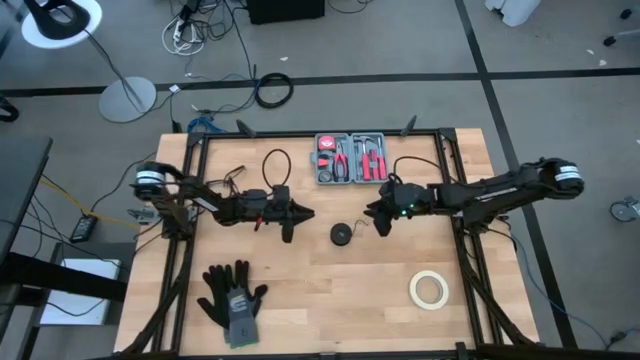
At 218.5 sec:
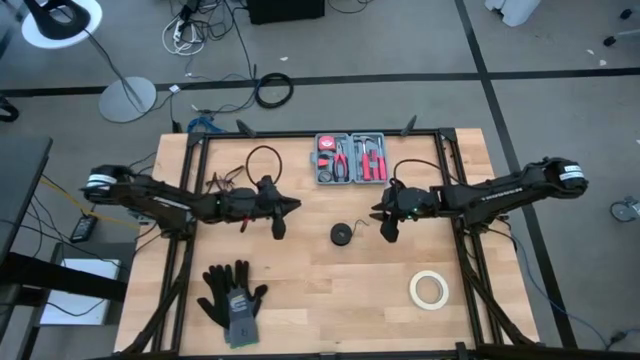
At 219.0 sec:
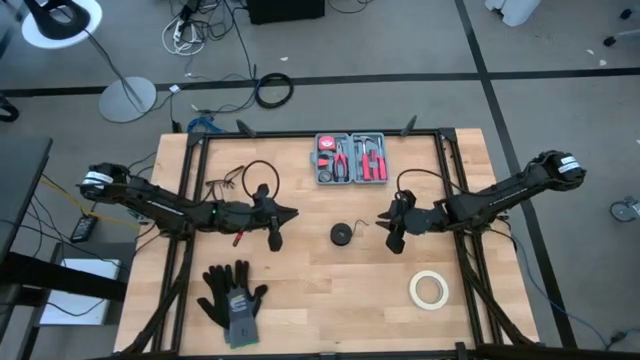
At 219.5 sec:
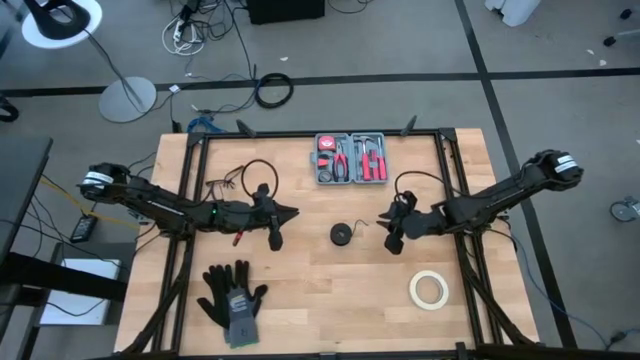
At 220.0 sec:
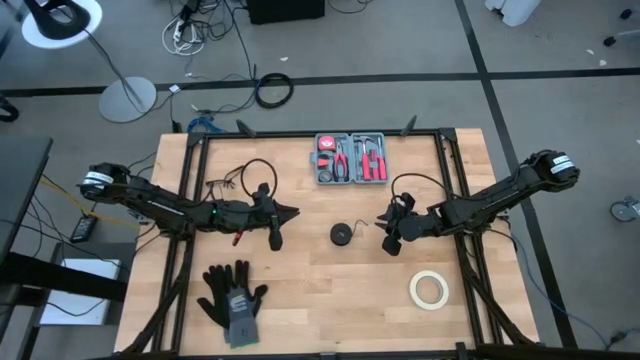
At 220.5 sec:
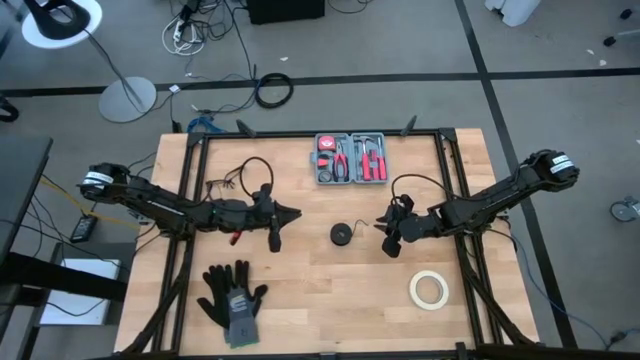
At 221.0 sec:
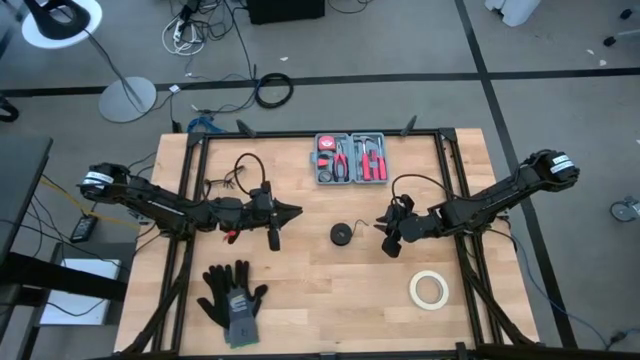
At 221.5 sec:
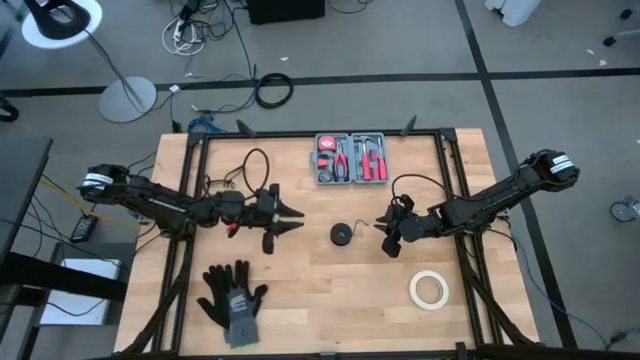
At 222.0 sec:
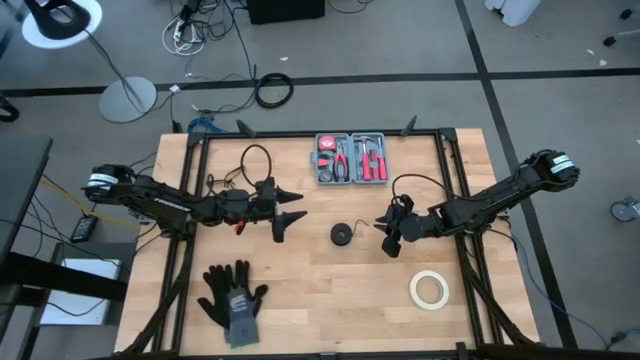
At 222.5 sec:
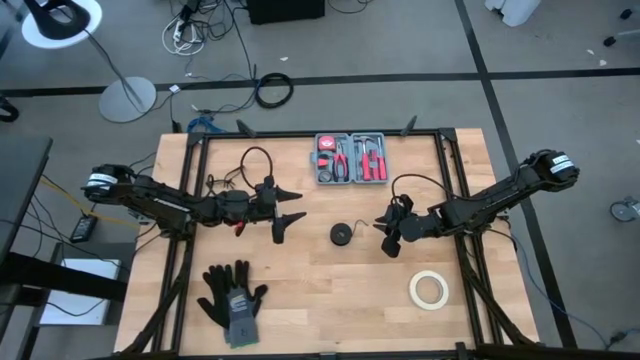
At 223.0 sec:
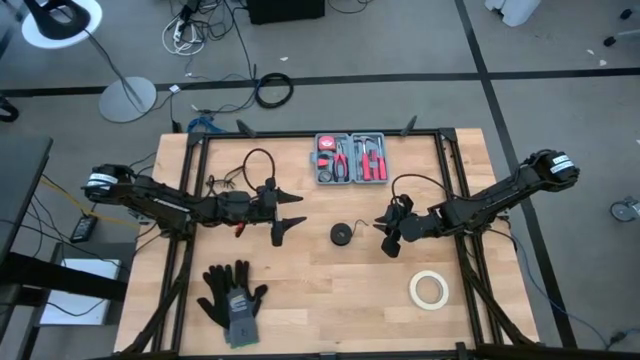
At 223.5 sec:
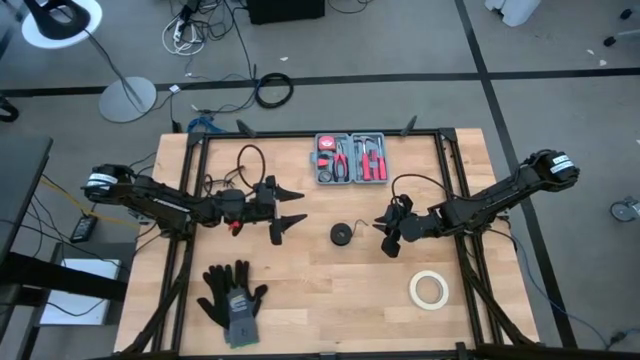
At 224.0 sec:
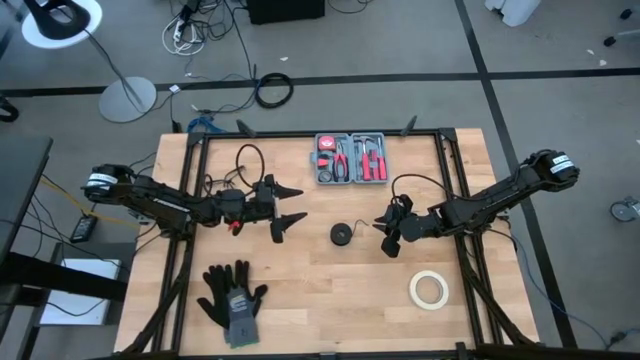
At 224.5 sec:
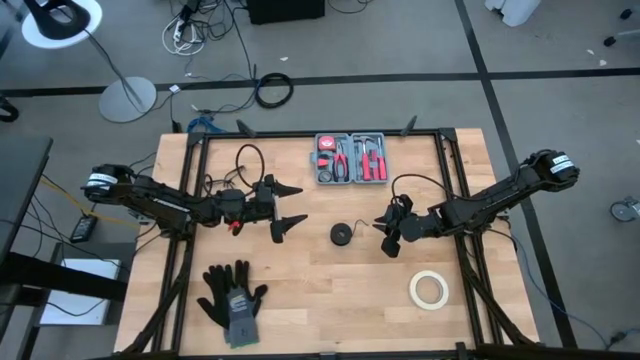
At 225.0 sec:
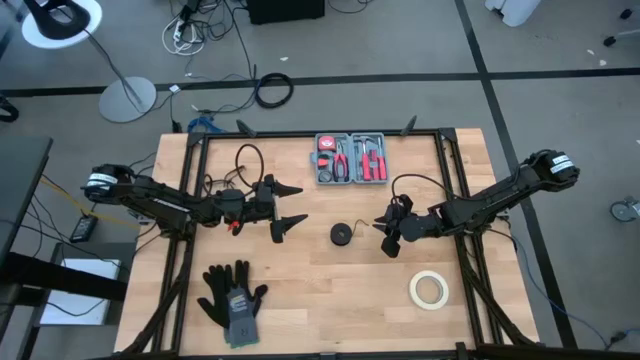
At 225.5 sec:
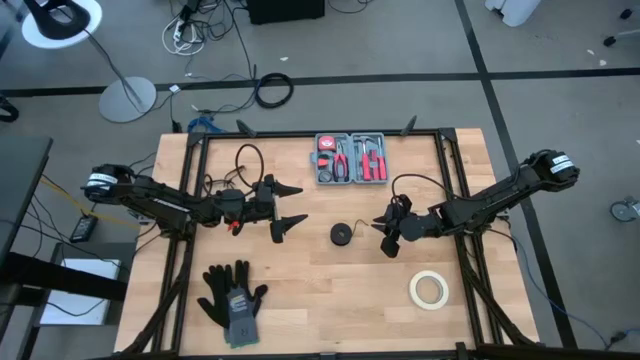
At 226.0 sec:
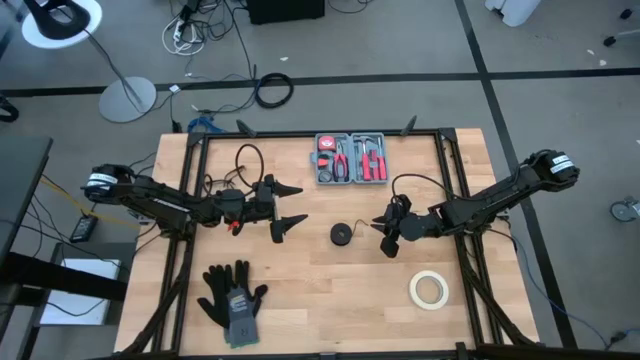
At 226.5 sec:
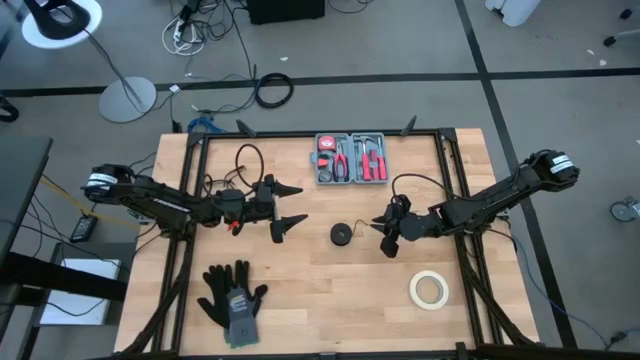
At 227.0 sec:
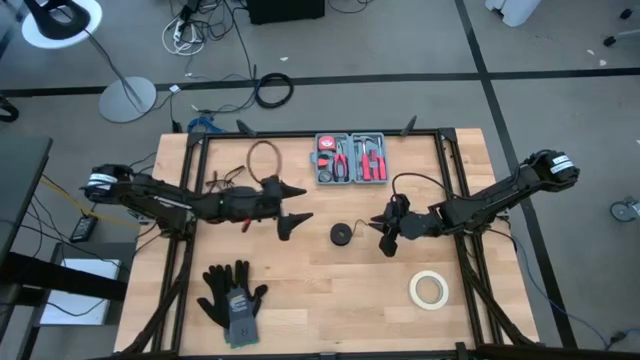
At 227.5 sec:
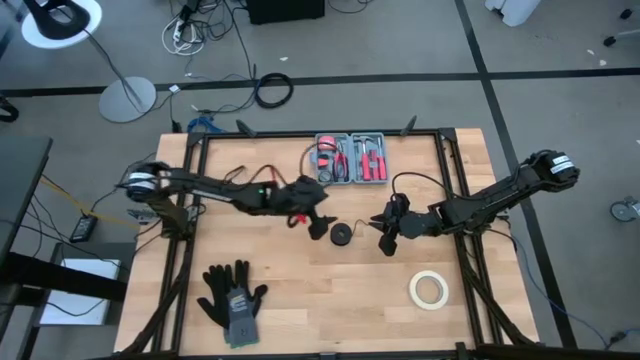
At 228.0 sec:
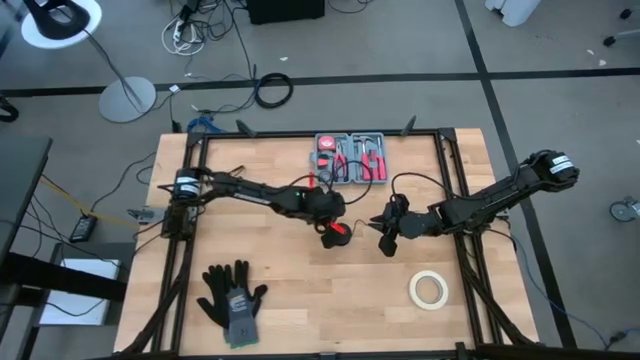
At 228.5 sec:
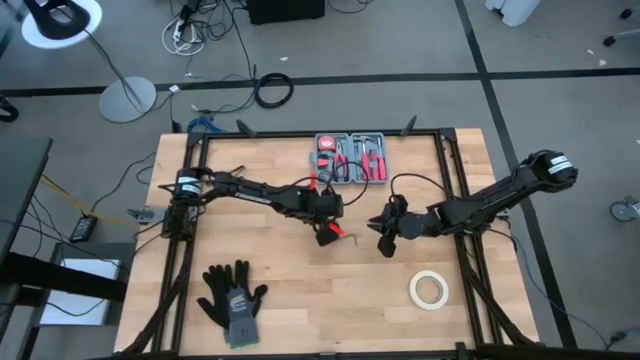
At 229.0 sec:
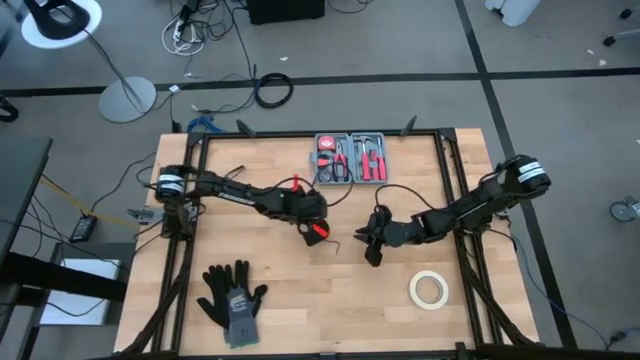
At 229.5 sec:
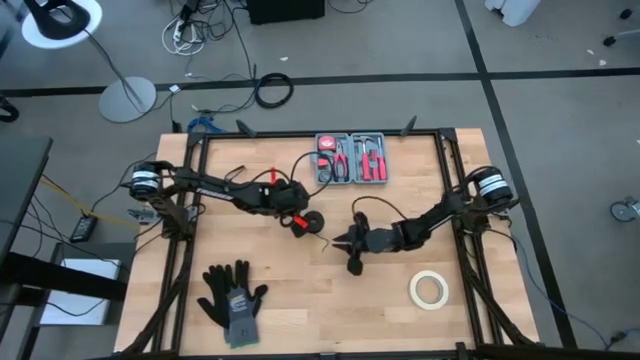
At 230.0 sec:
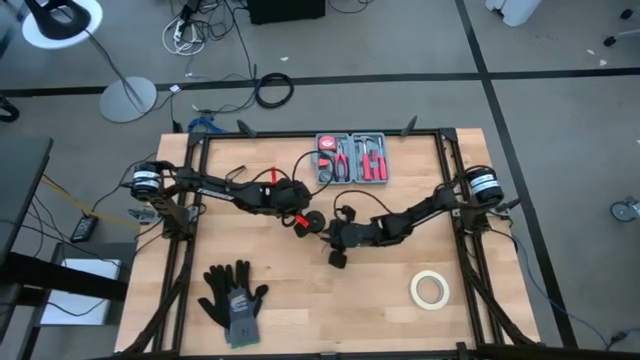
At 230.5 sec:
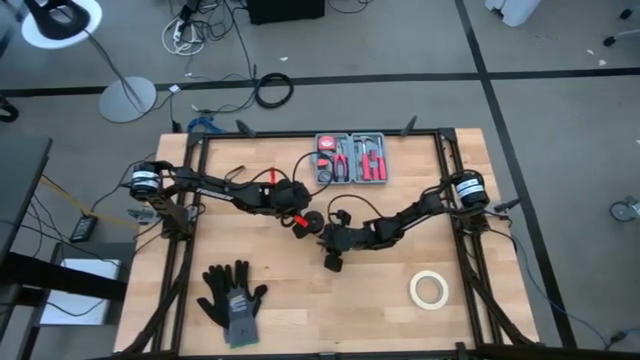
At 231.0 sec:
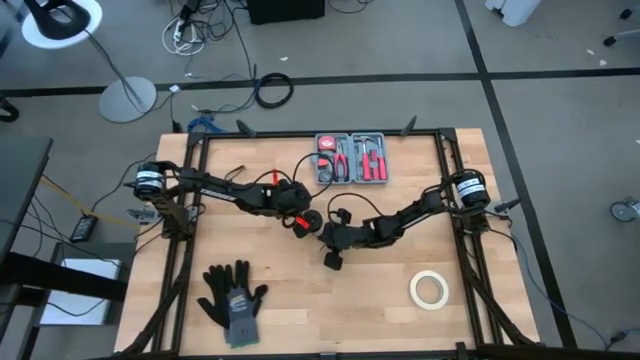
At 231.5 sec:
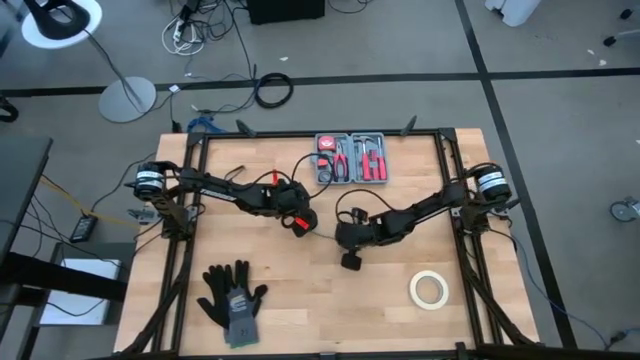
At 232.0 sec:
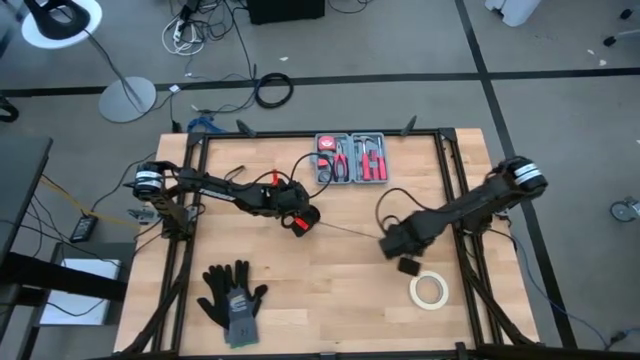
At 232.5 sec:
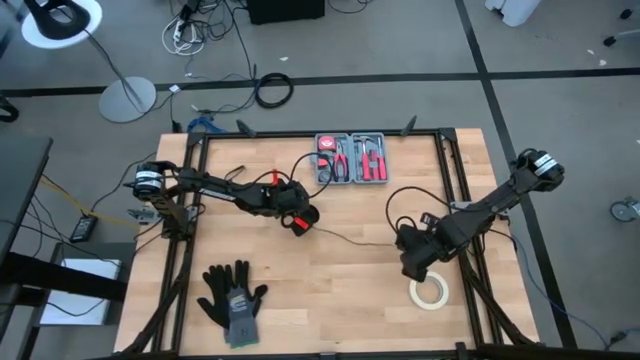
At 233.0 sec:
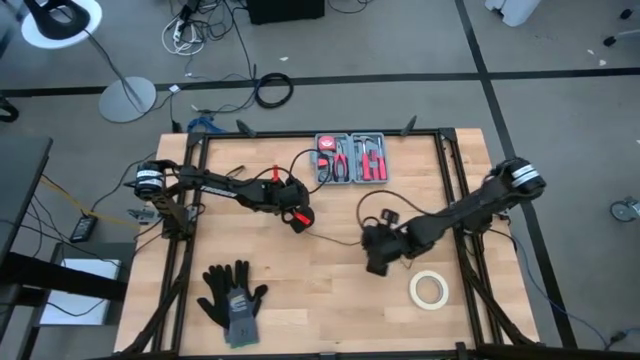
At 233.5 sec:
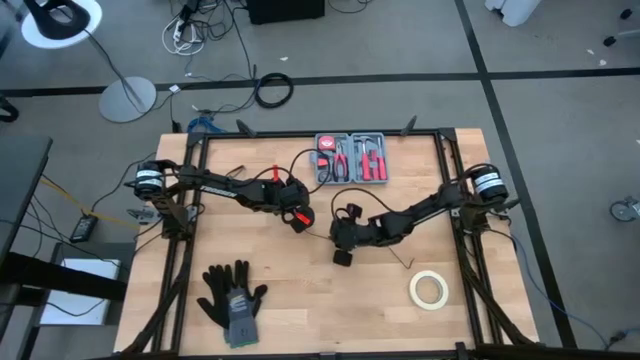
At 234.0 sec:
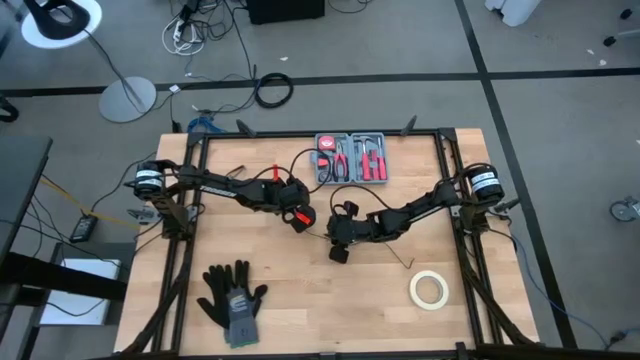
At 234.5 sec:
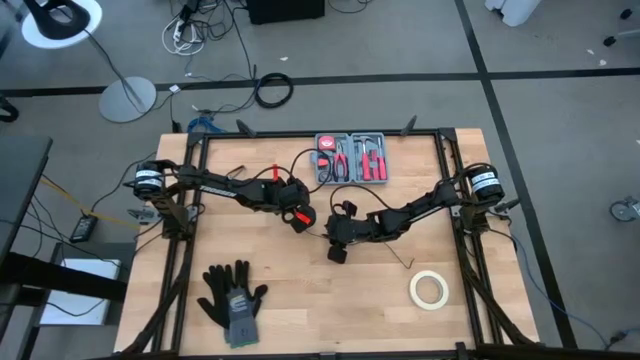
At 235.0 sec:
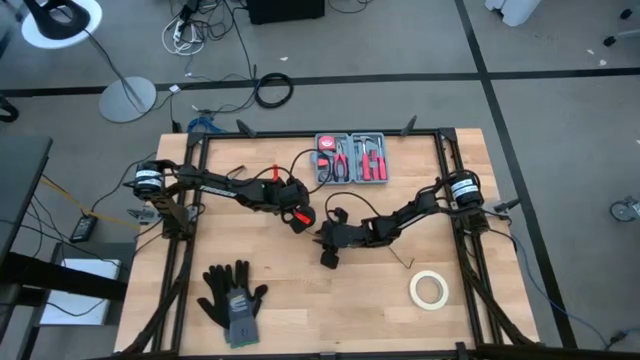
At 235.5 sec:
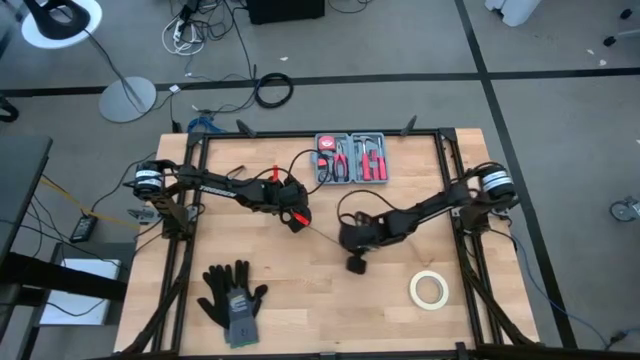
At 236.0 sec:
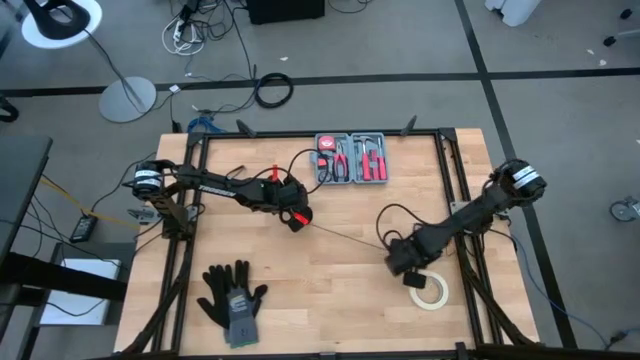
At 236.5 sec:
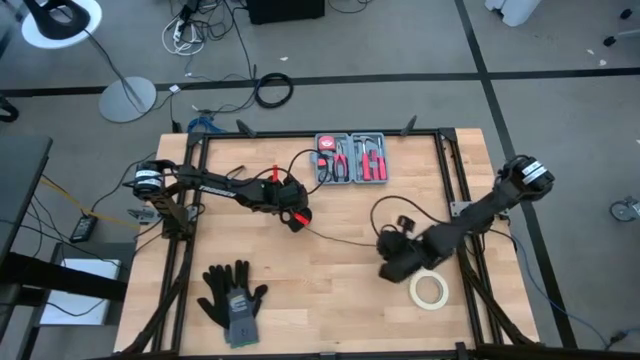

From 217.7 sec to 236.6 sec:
Task: Coil cords
Uncoil the black wire from the black spool
